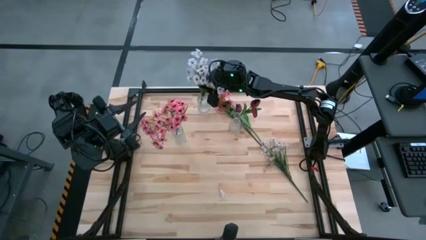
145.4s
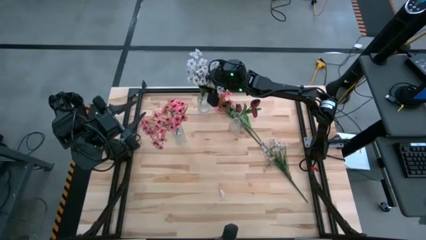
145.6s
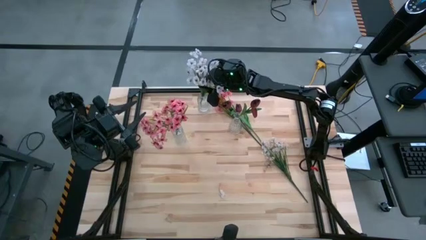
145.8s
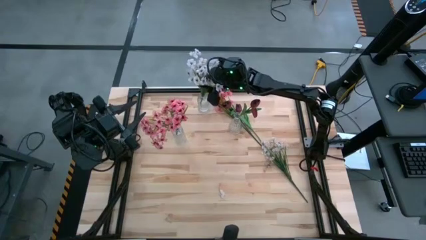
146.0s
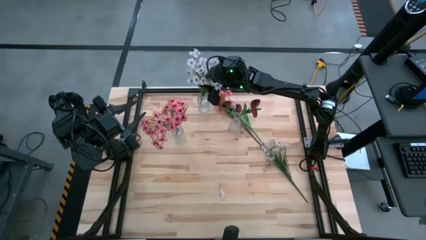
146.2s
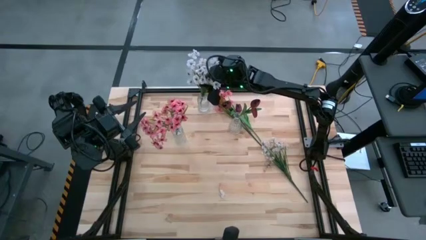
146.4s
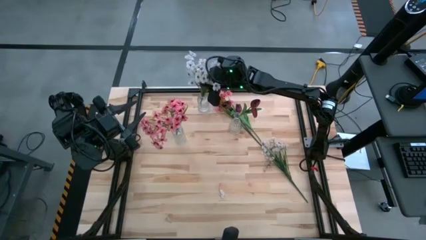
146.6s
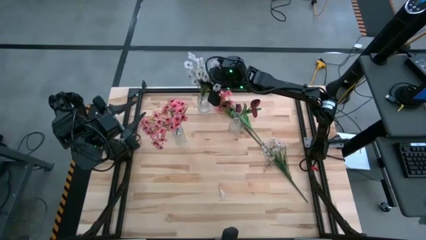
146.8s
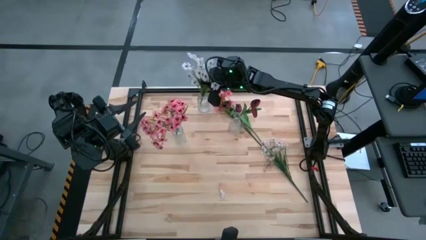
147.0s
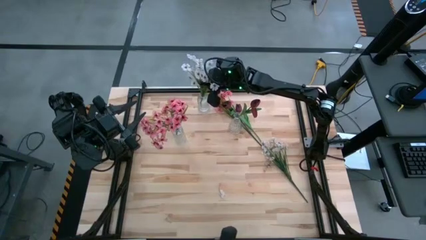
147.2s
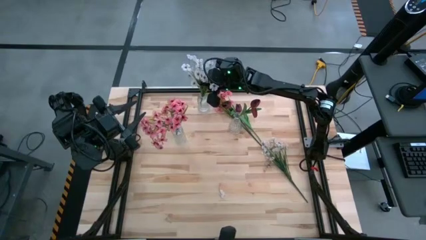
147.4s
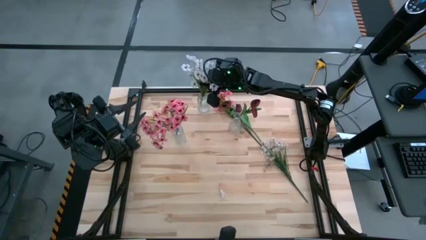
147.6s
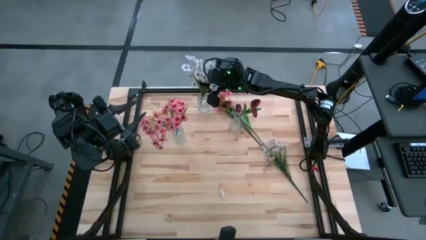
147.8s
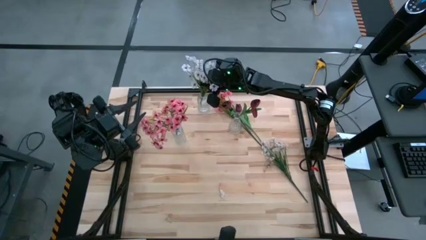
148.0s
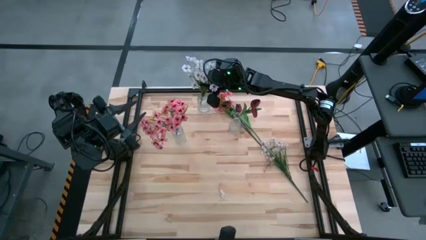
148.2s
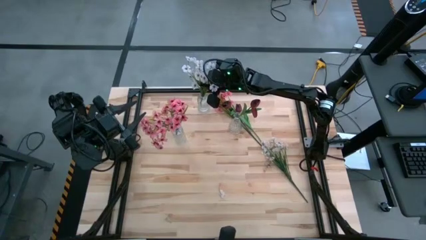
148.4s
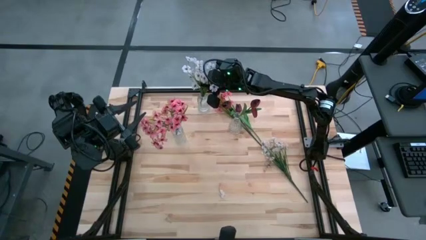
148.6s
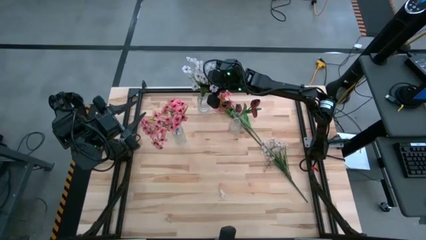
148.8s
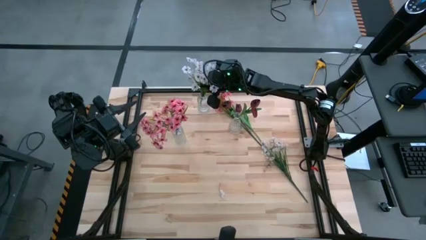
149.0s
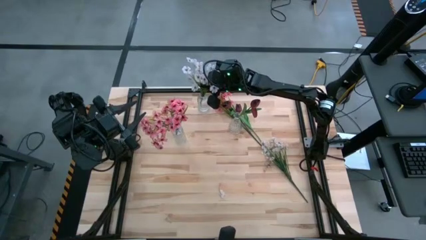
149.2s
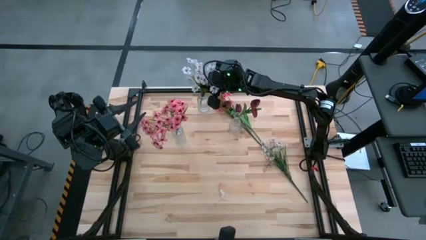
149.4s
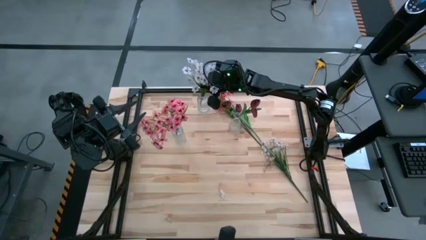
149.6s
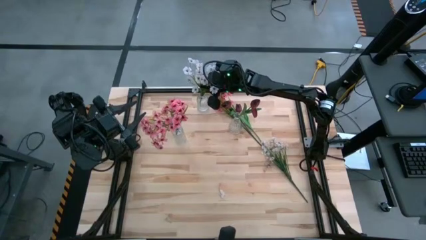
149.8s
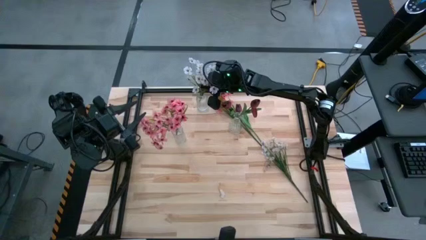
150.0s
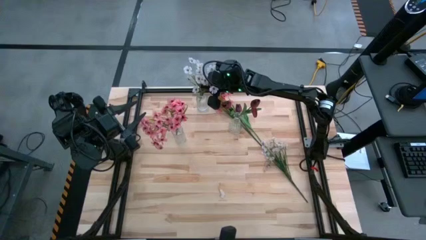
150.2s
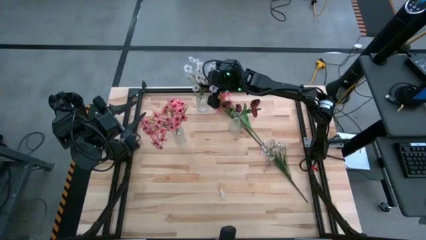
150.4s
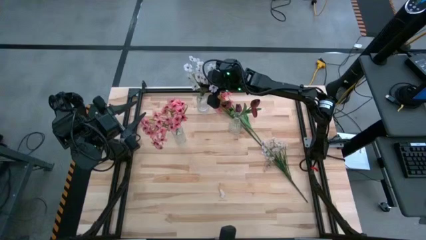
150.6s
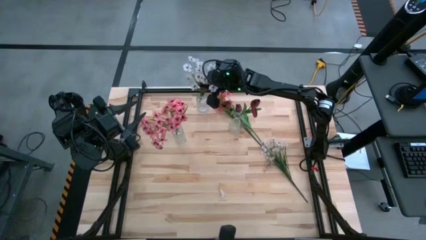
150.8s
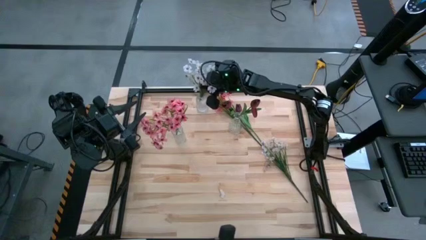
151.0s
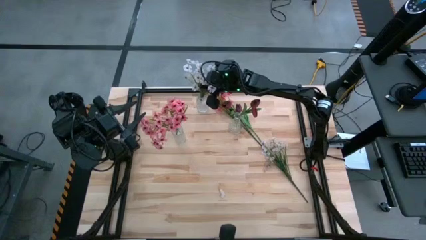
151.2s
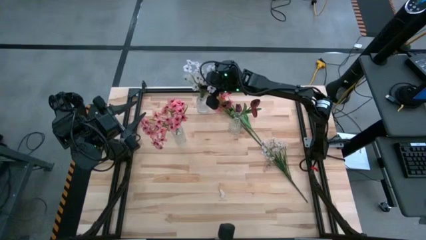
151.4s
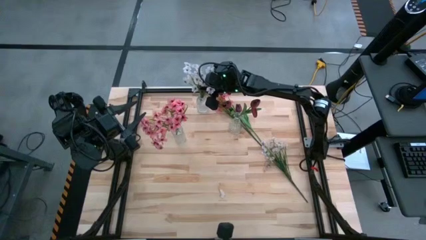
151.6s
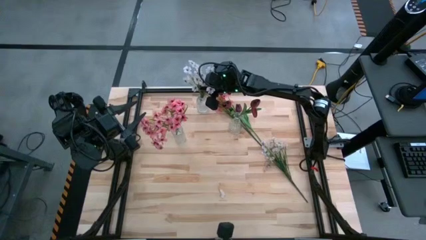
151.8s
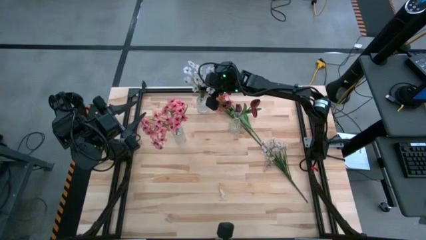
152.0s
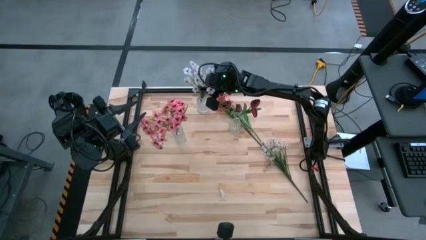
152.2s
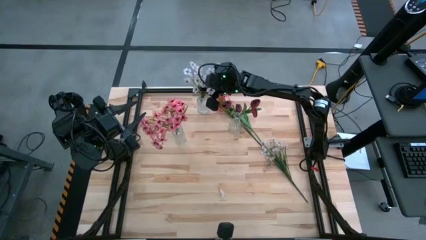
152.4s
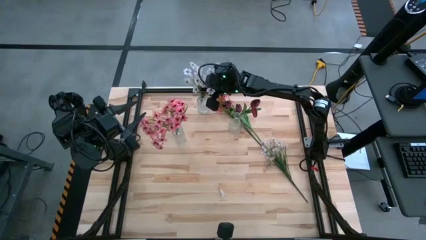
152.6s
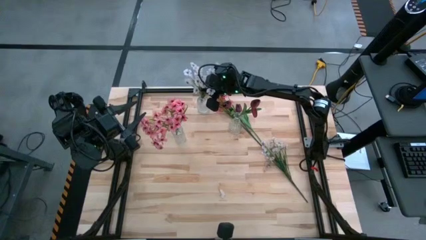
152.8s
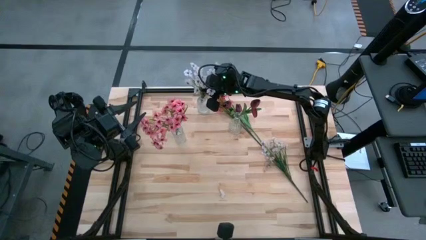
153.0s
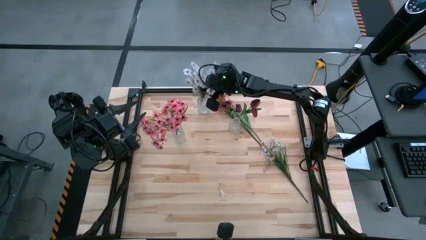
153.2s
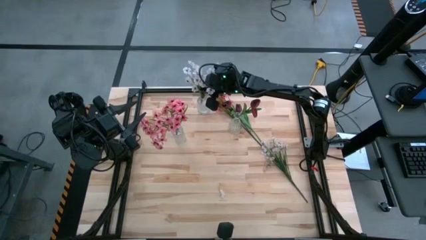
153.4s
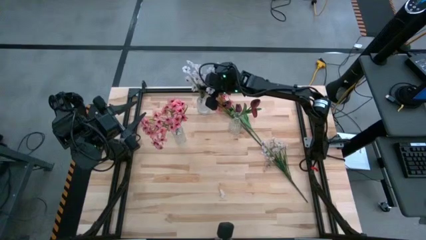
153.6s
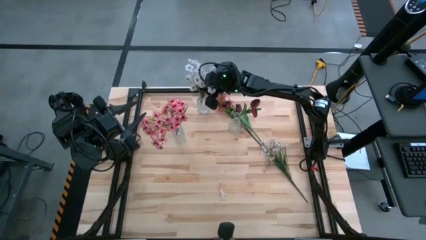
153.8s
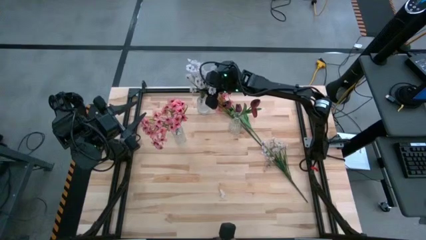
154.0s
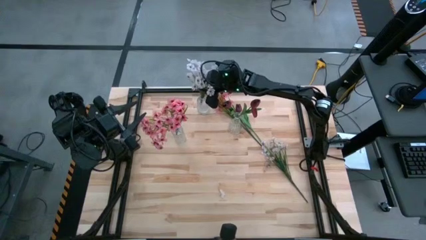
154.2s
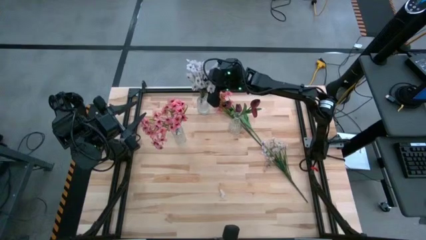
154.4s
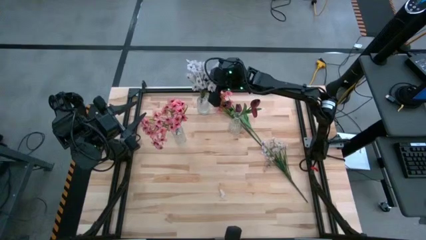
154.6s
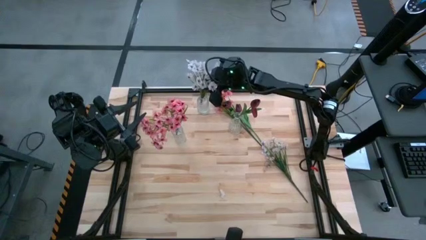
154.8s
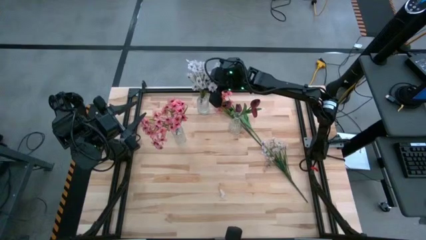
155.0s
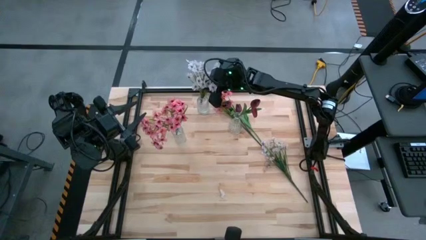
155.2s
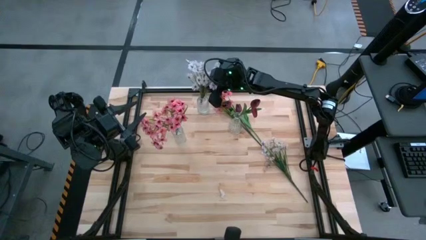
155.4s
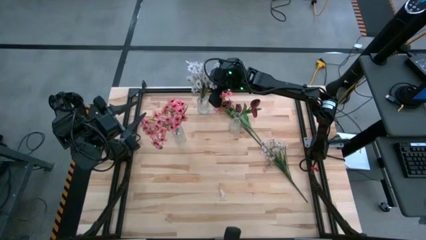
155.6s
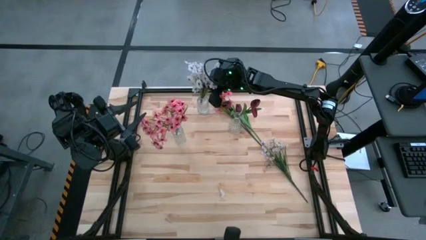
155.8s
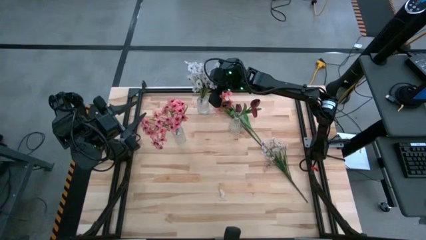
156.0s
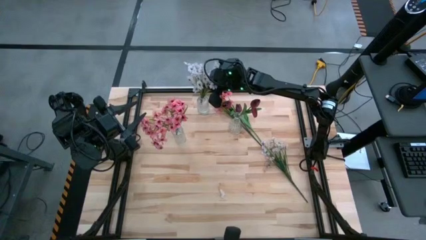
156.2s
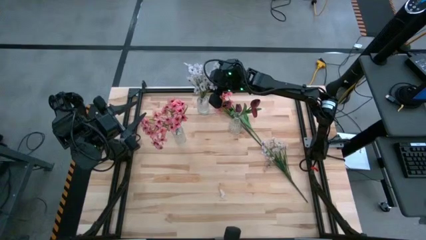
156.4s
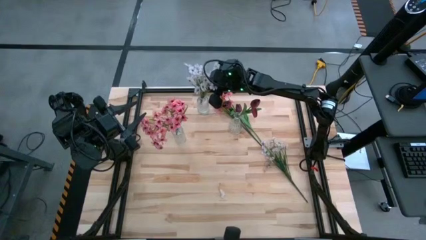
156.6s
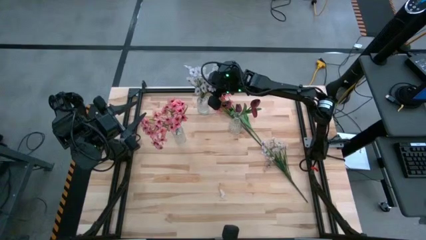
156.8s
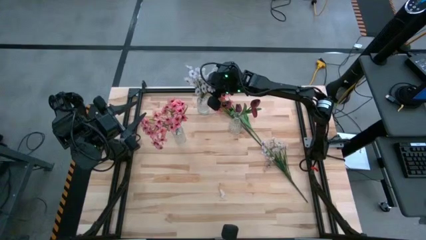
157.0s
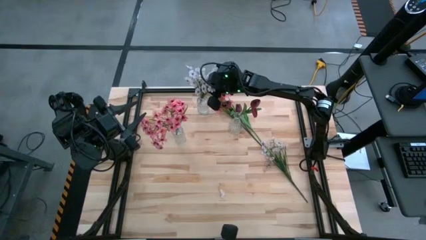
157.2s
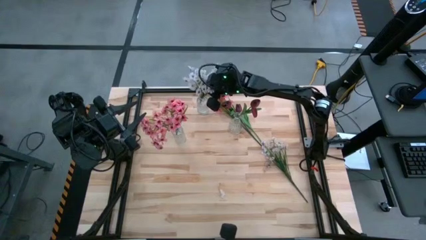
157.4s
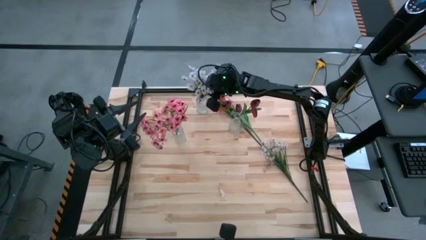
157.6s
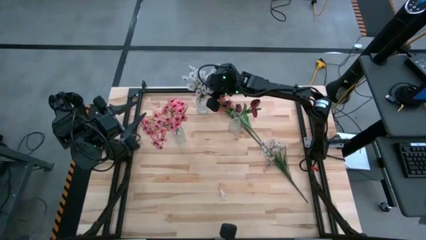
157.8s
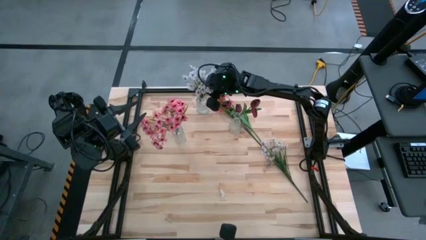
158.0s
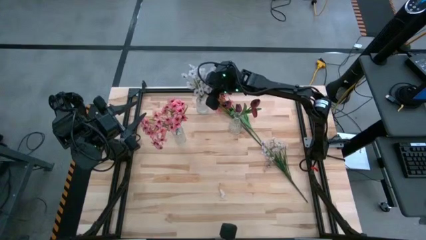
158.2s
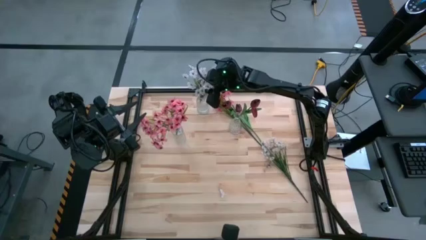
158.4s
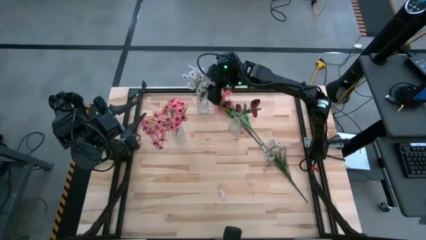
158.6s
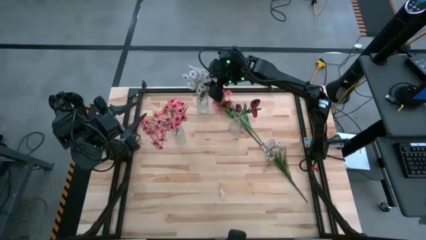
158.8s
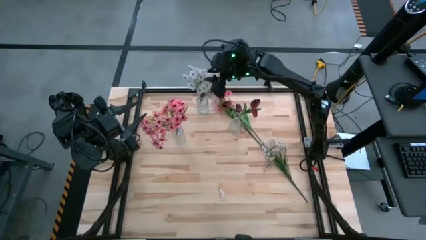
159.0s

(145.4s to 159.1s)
Task: Sort flowers into vase by color
Put the top white flower into the top transparent vase
